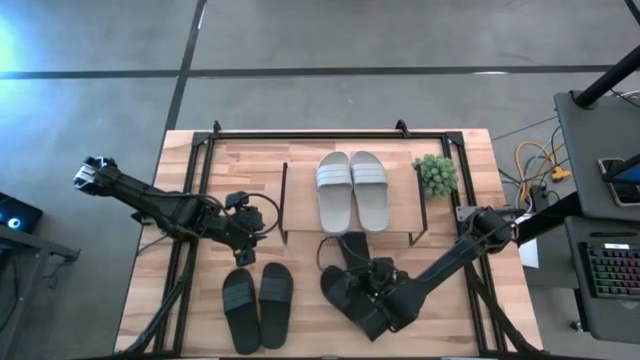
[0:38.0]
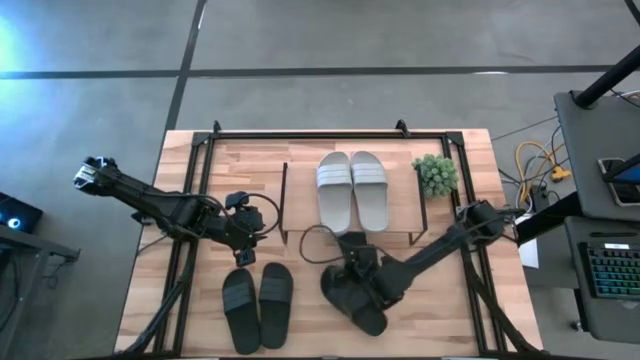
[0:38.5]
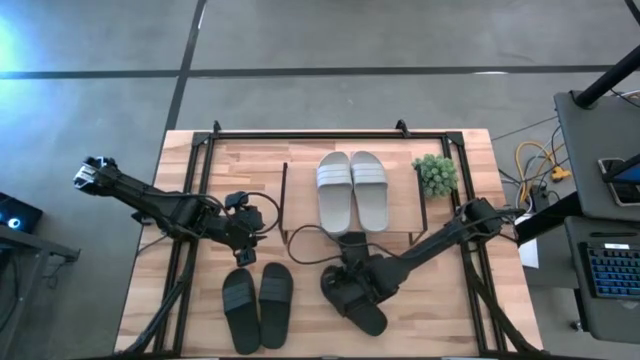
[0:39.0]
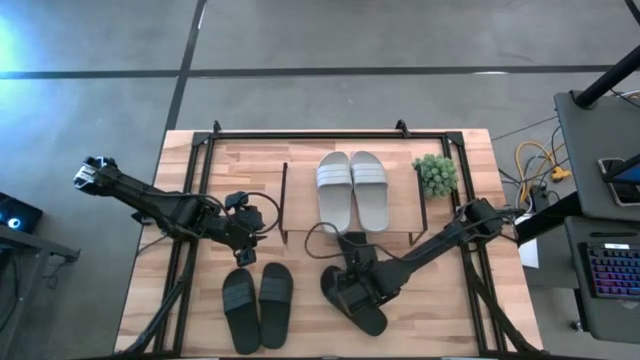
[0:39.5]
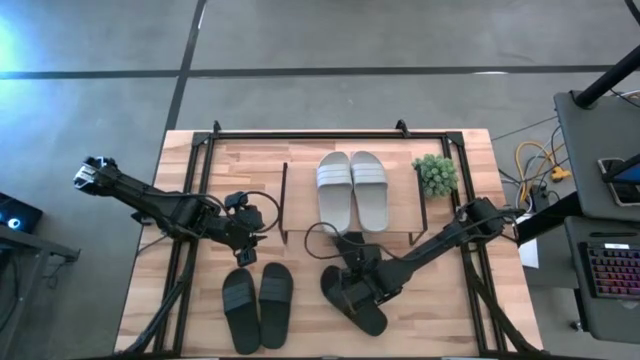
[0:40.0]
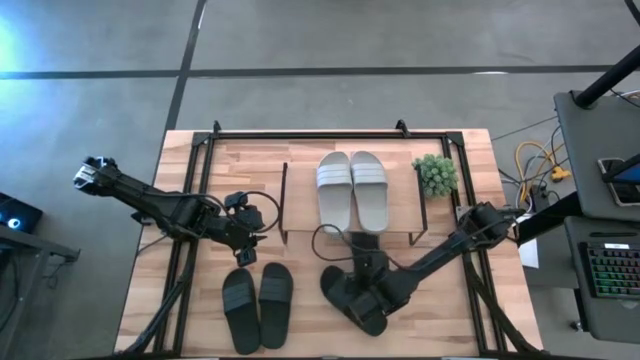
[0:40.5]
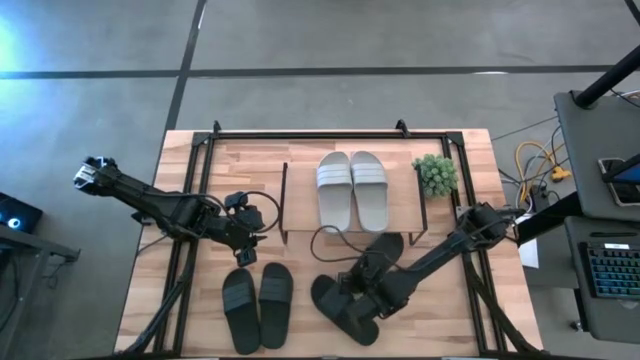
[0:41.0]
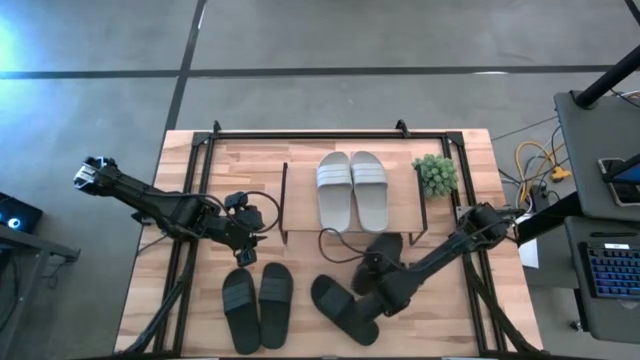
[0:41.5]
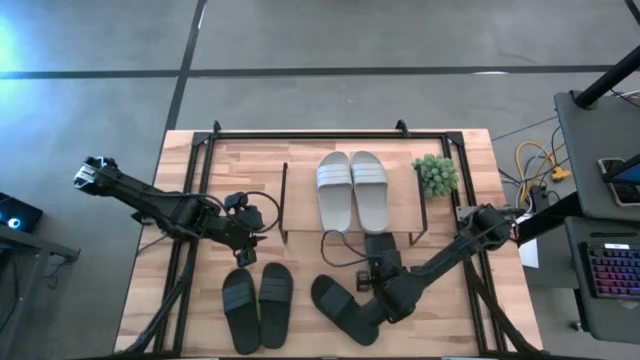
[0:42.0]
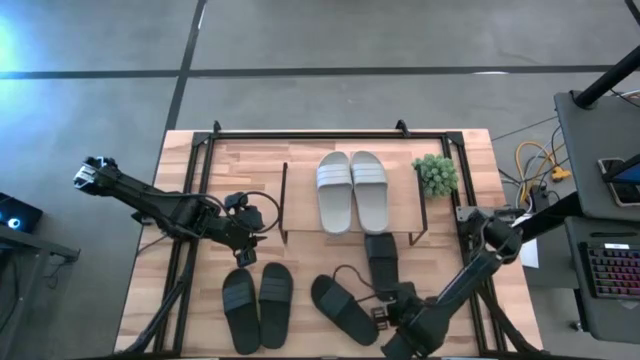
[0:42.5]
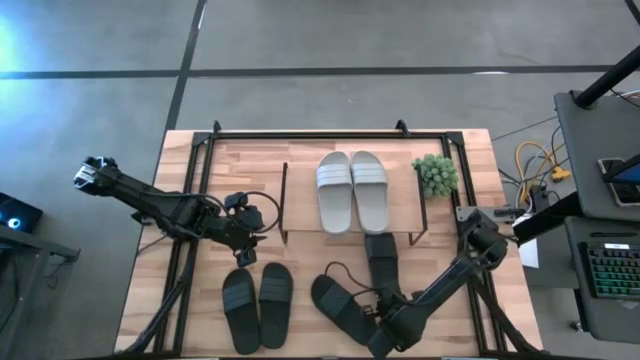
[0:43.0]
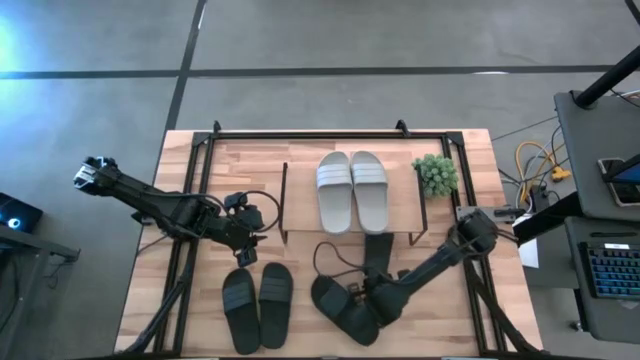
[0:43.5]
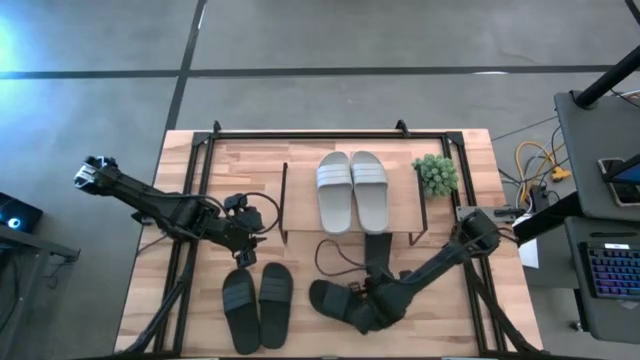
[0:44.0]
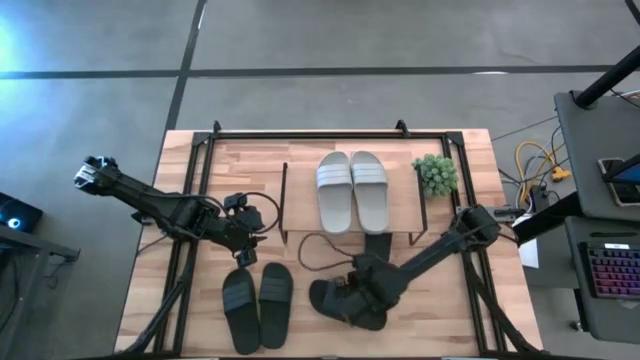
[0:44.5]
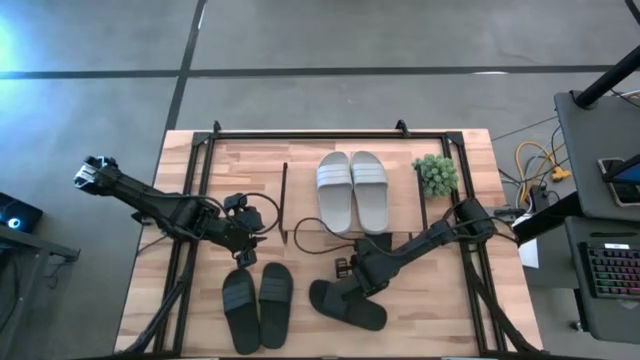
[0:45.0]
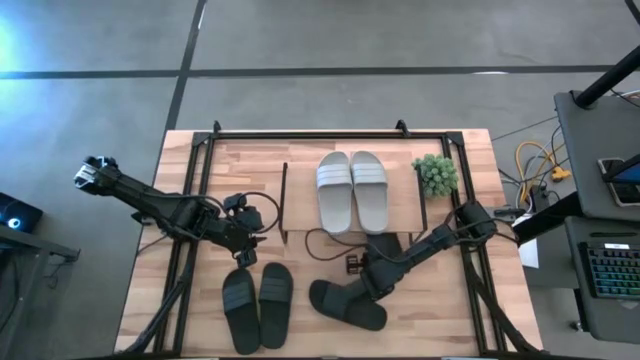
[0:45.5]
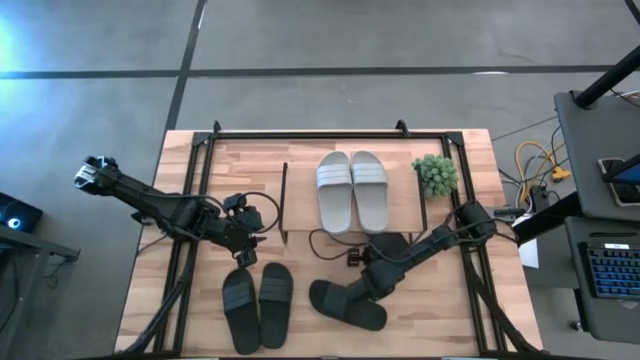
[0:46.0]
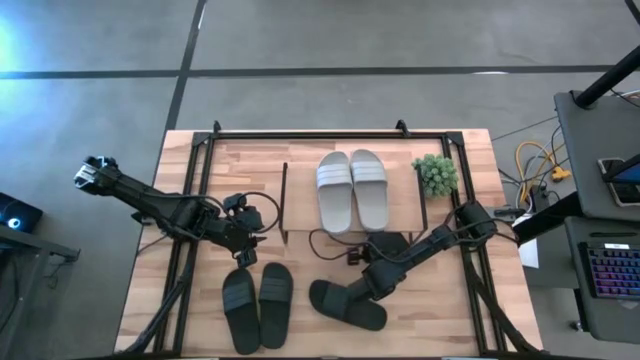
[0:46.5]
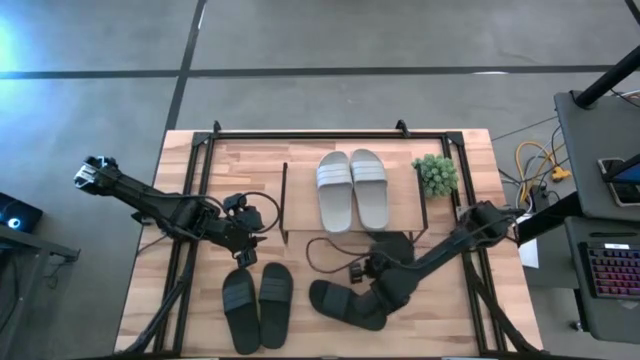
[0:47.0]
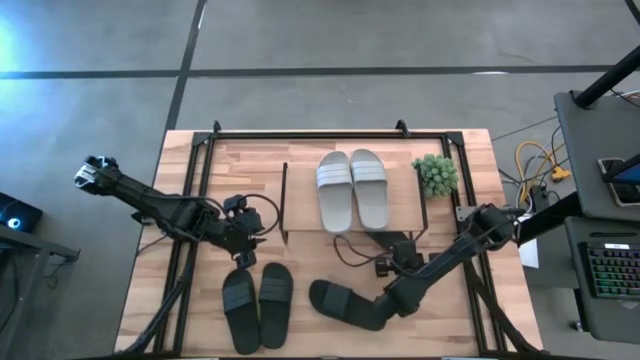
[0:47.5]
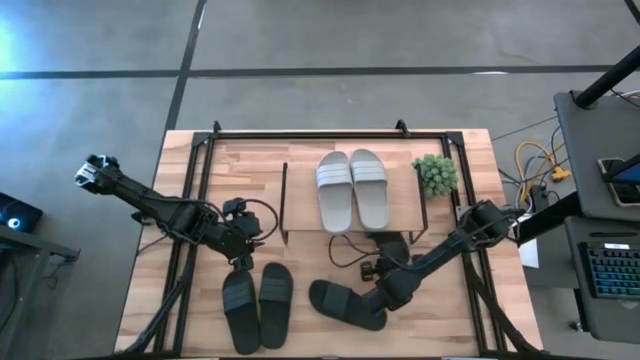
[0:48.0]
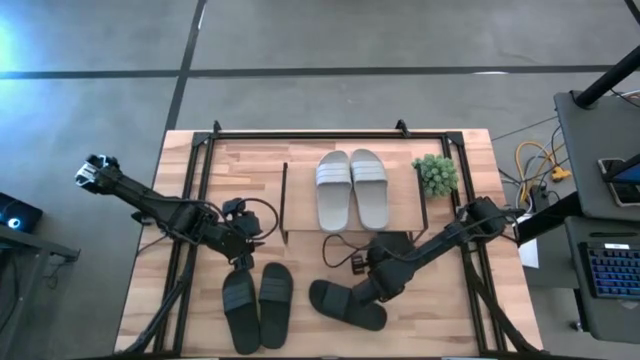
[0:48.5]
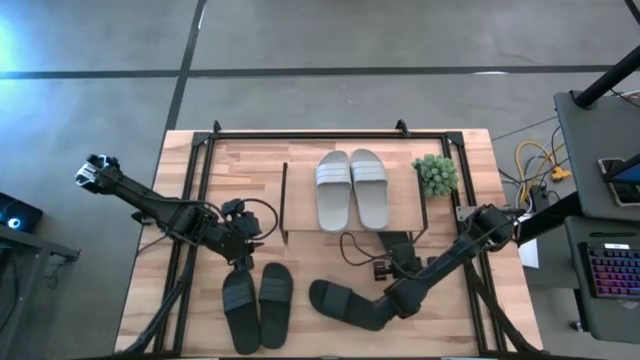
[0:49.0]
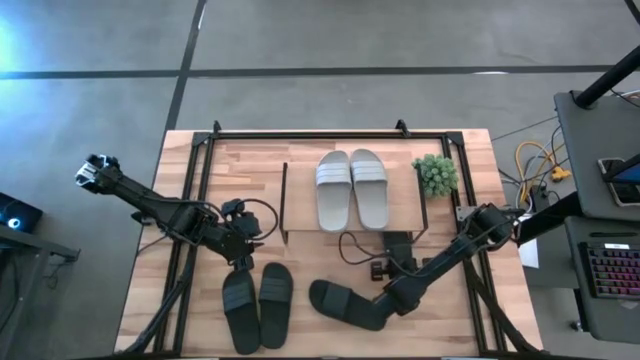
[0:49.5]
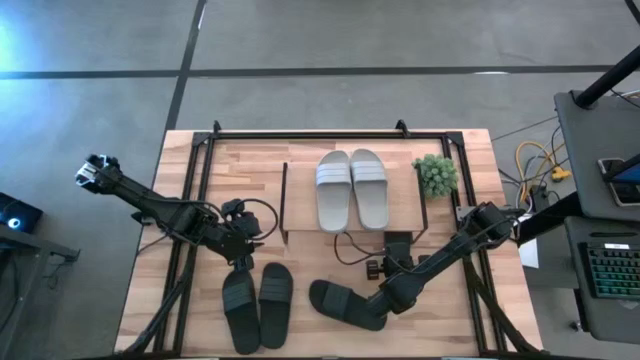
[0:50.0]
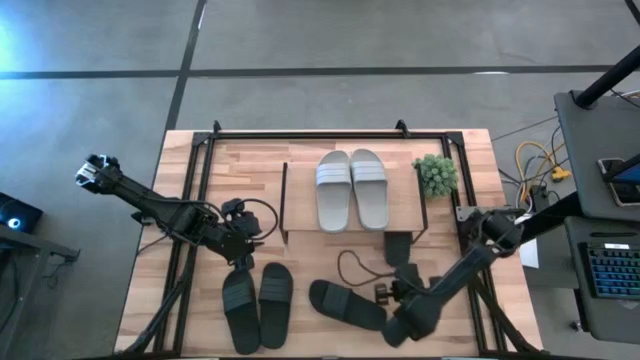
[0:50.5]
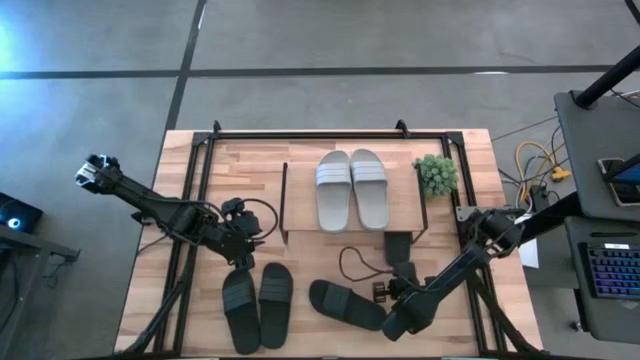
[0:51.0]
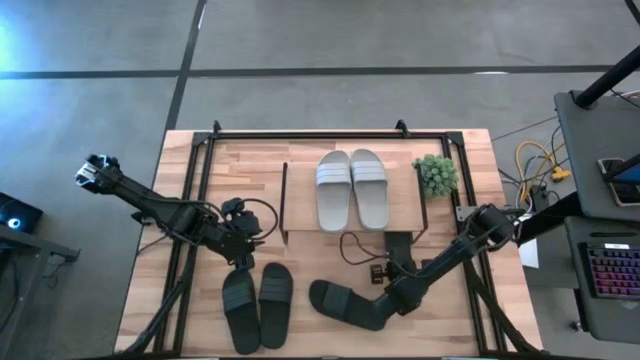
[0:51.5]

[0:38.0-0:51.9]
Task: Pick and place slides into the shelf
Put the right black slide under the shelf

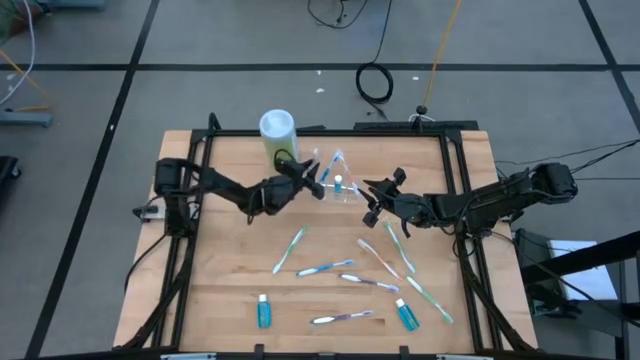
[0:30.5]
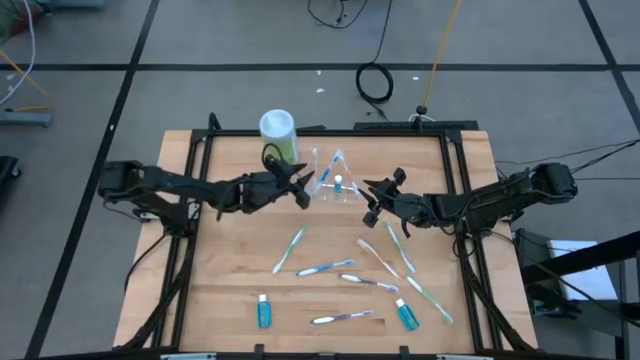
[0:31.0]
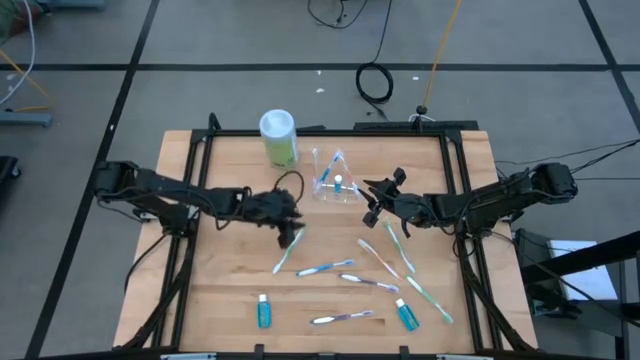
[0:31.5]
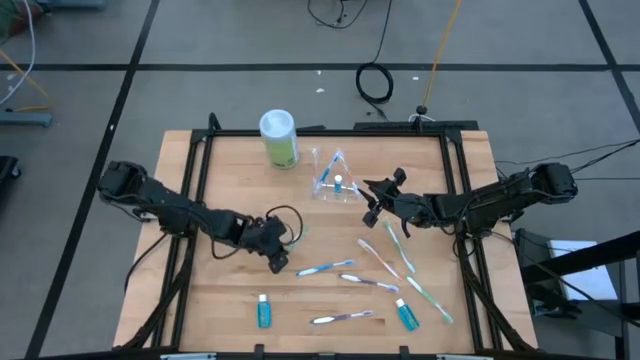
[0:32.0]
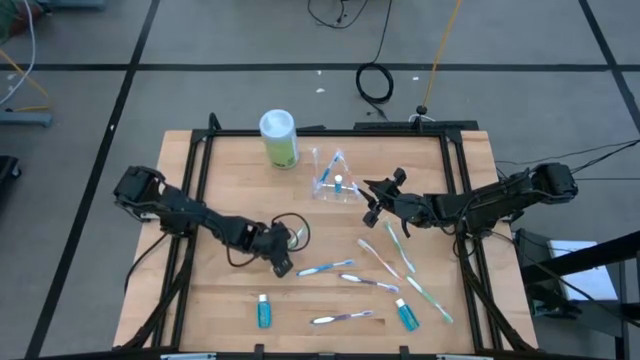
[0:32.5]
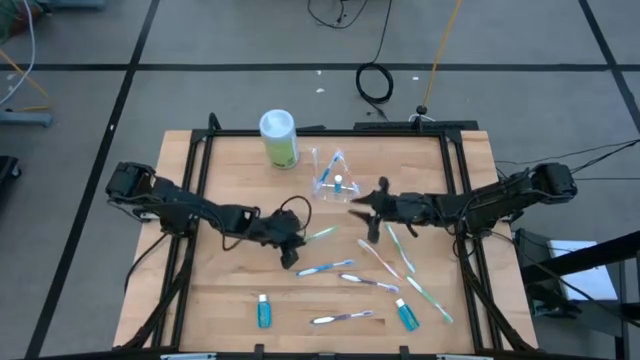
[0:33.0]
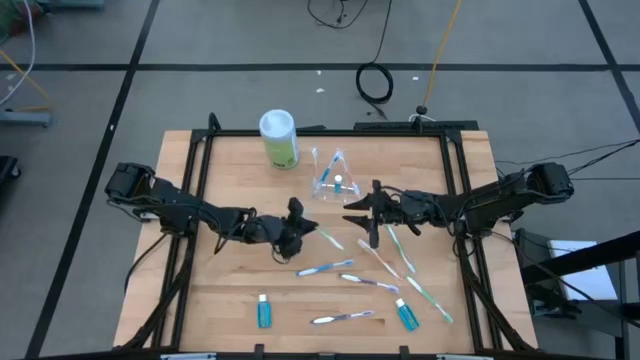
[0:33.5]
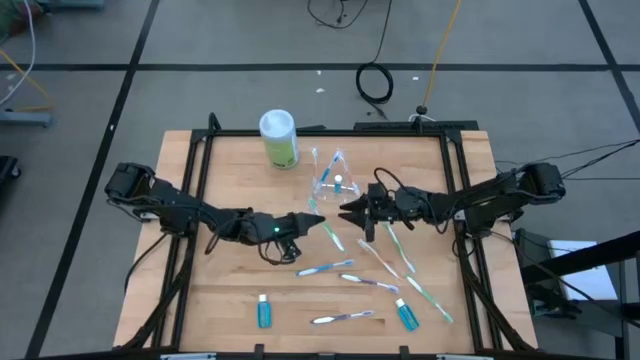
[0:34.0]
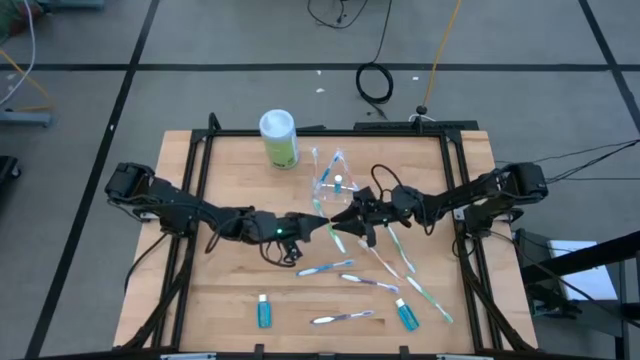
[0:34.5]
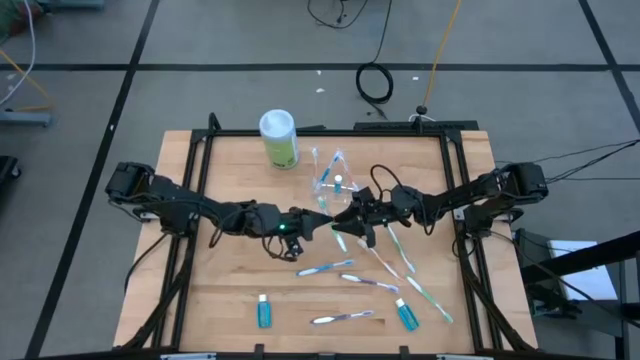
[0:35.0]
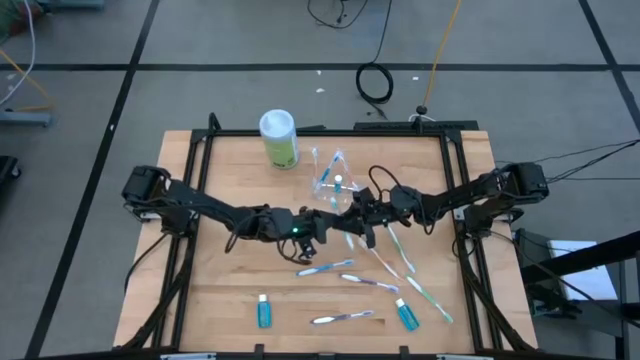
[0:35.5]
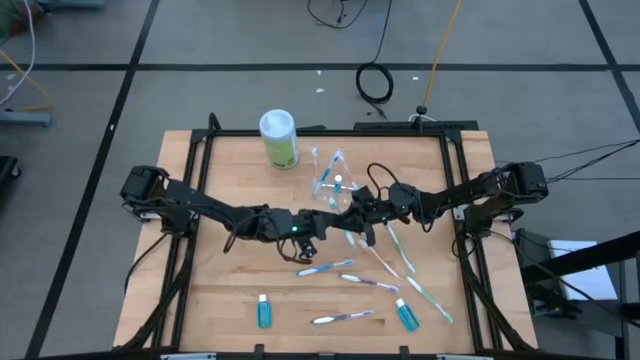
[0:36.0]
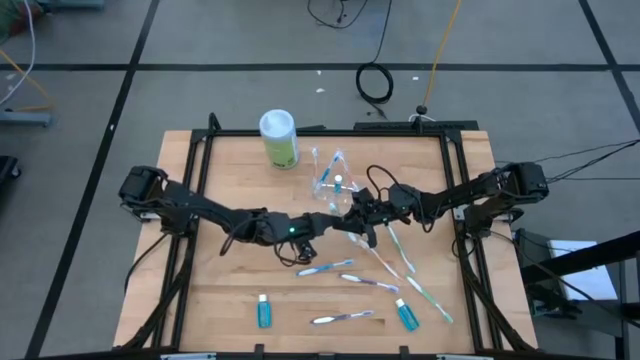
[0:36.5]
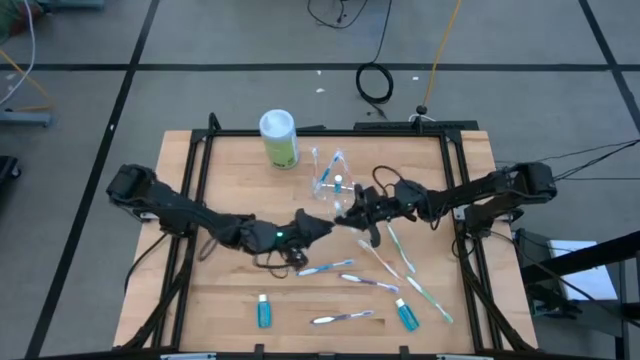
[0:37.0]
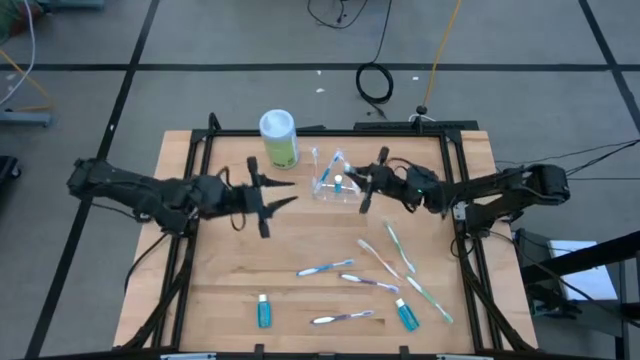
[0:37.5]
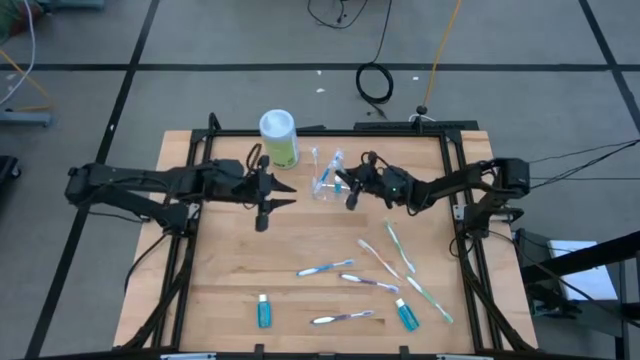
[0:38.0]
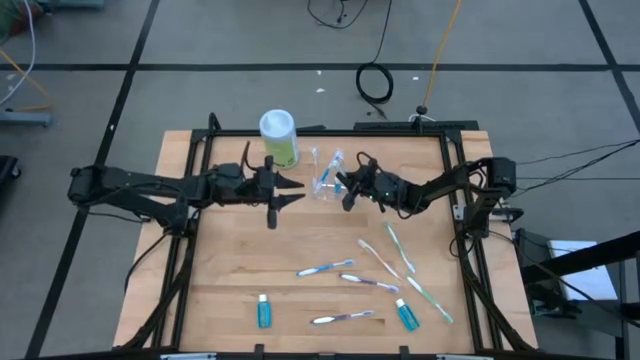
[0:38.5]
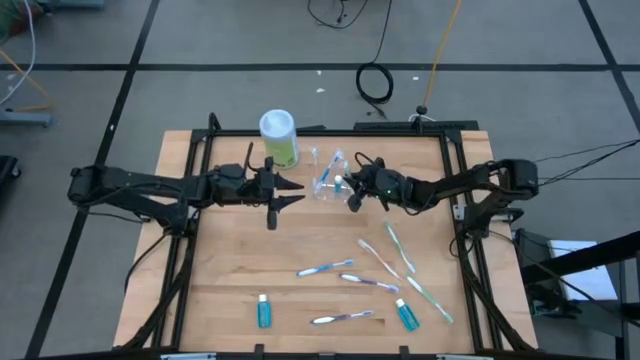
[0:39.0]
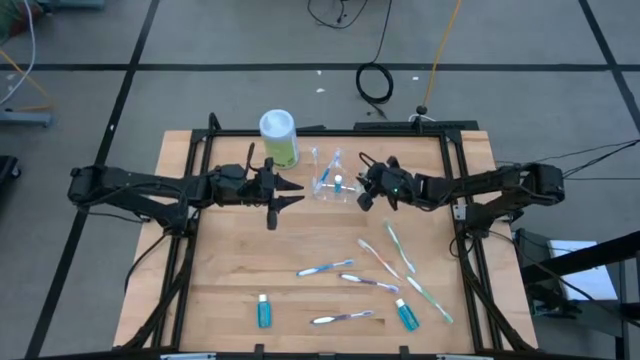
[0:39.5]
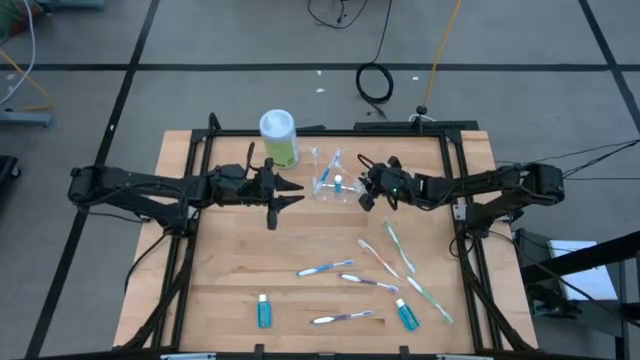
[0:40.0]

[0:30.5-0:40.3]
Task: Pick & Place toothbrushing station
Put the left green toothbrush into the transparent organizer
